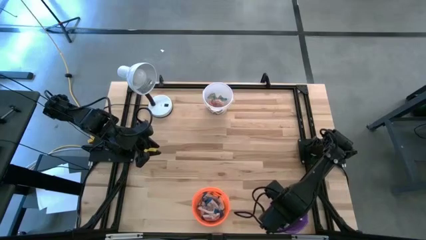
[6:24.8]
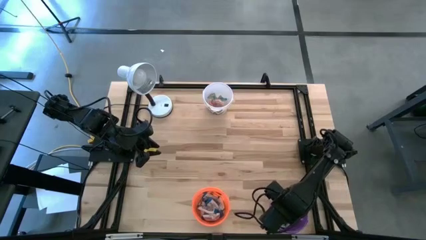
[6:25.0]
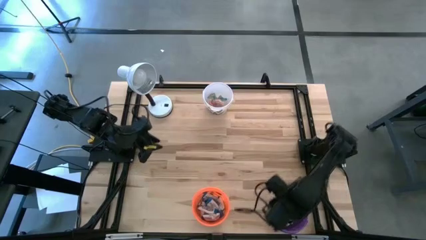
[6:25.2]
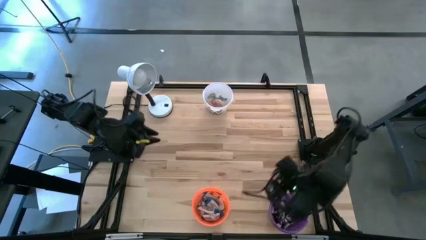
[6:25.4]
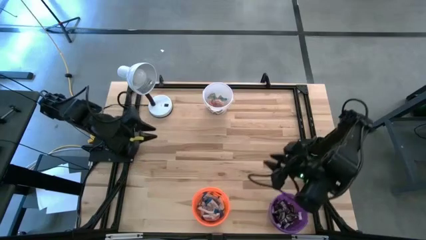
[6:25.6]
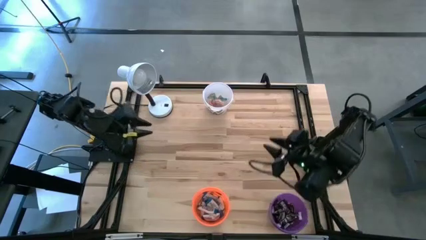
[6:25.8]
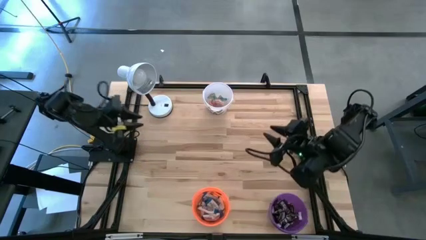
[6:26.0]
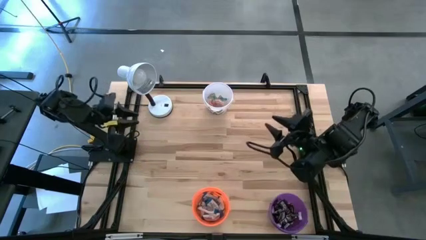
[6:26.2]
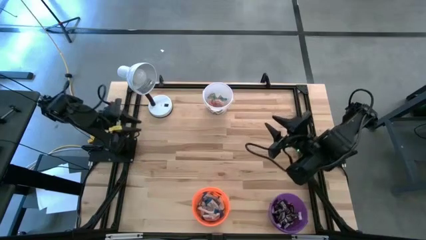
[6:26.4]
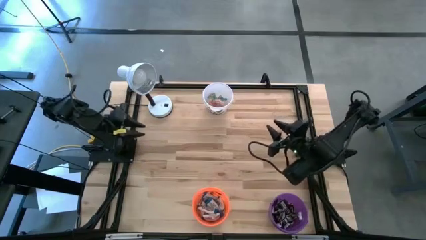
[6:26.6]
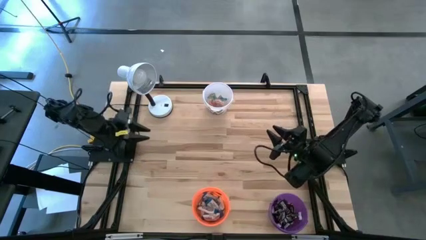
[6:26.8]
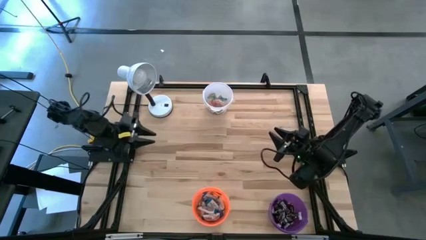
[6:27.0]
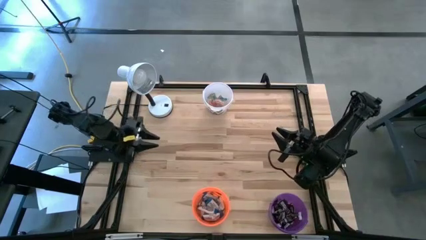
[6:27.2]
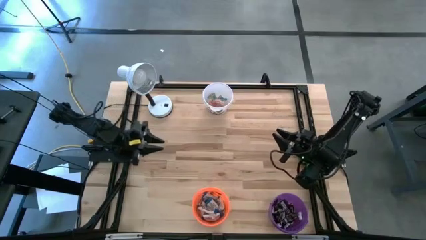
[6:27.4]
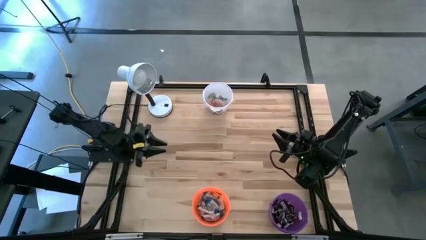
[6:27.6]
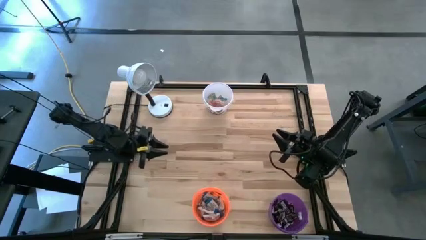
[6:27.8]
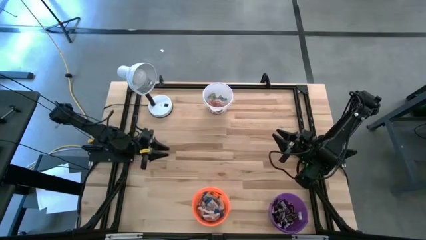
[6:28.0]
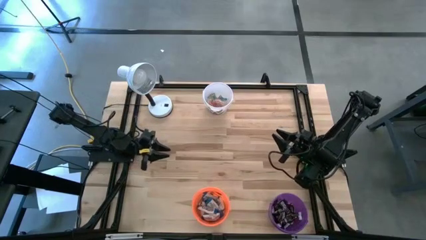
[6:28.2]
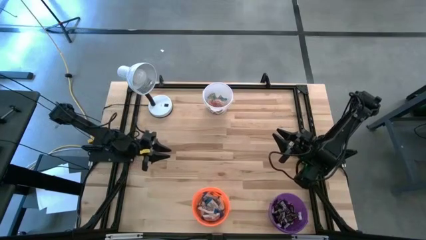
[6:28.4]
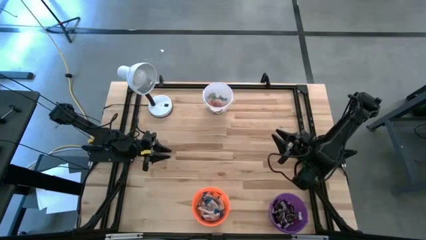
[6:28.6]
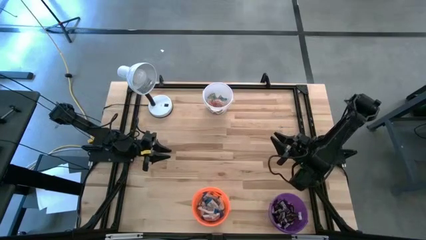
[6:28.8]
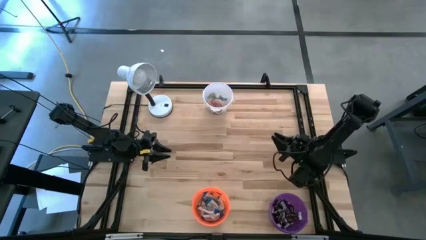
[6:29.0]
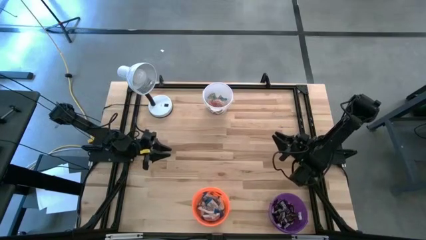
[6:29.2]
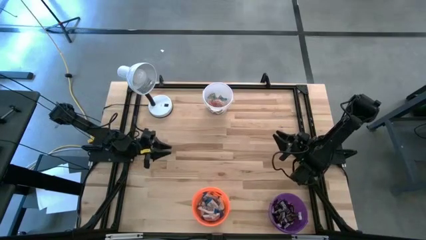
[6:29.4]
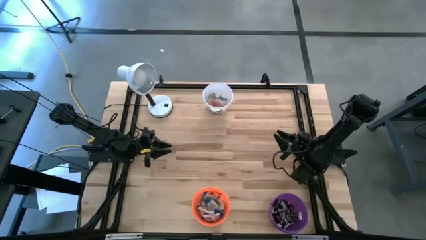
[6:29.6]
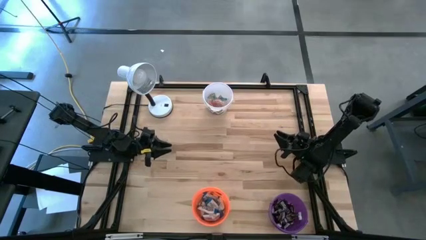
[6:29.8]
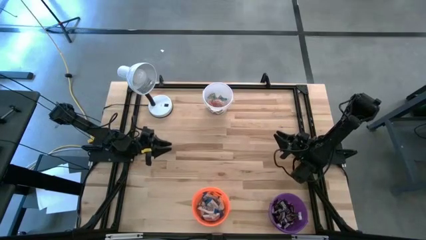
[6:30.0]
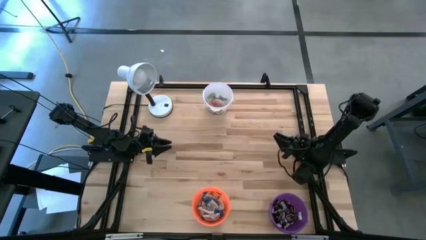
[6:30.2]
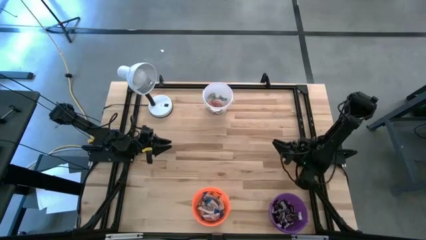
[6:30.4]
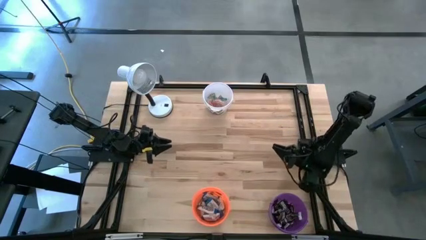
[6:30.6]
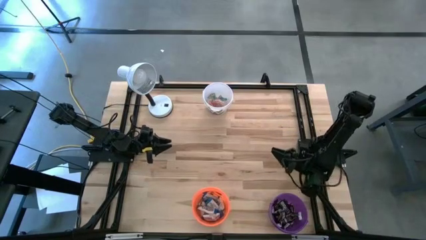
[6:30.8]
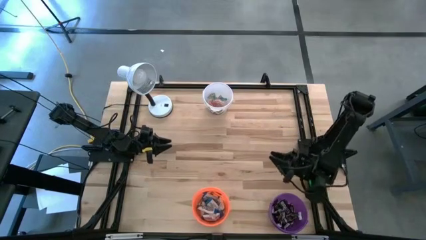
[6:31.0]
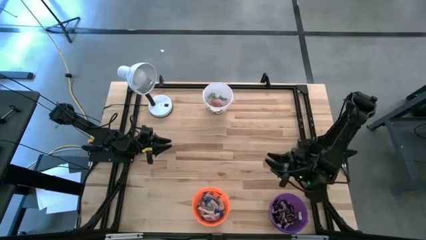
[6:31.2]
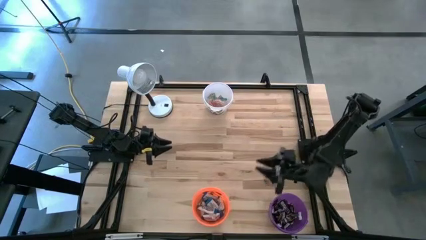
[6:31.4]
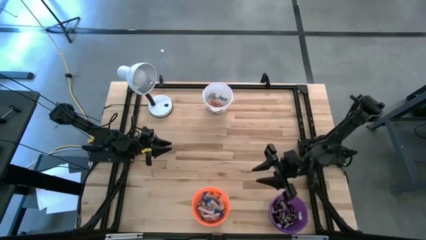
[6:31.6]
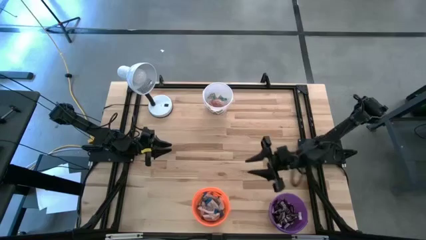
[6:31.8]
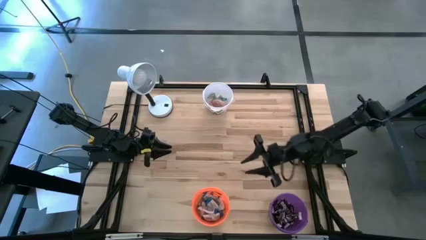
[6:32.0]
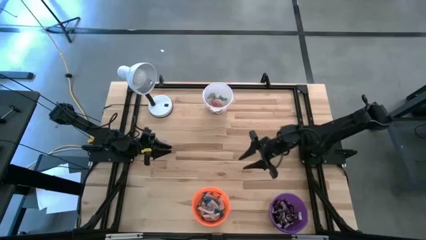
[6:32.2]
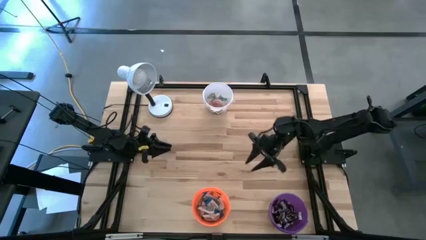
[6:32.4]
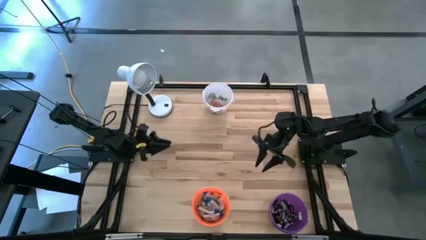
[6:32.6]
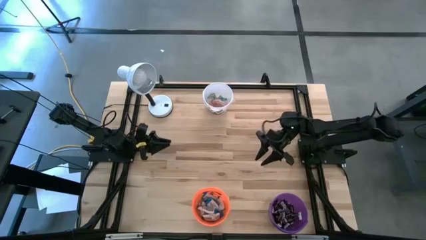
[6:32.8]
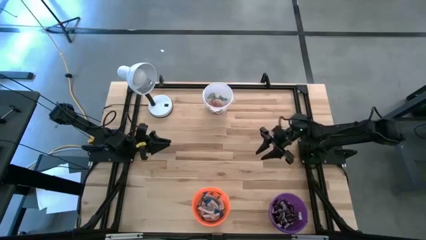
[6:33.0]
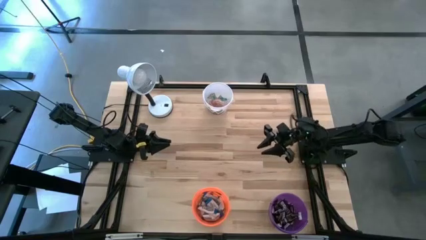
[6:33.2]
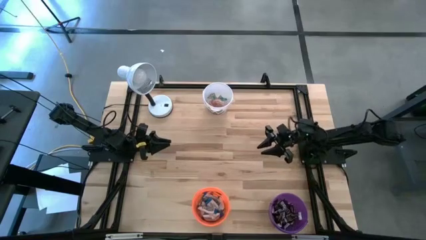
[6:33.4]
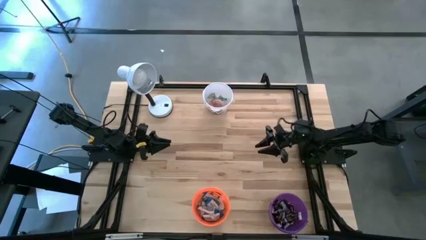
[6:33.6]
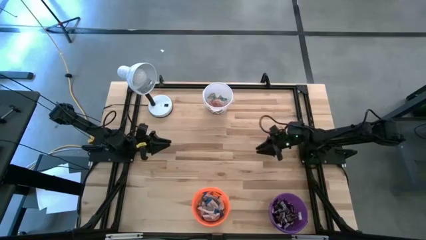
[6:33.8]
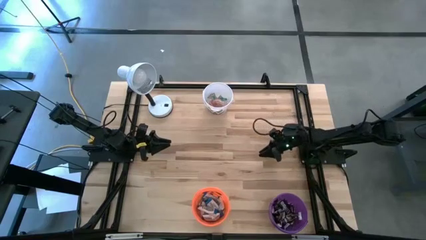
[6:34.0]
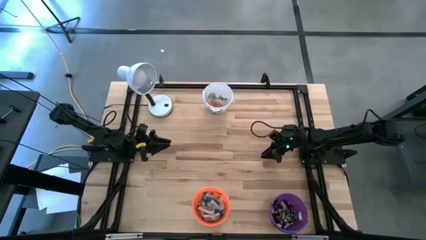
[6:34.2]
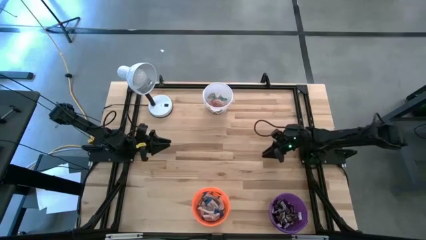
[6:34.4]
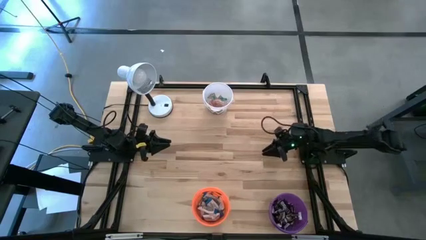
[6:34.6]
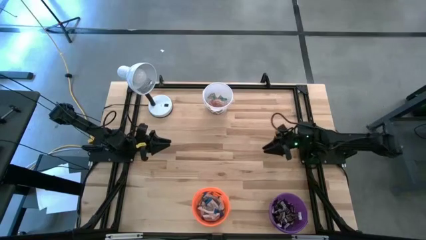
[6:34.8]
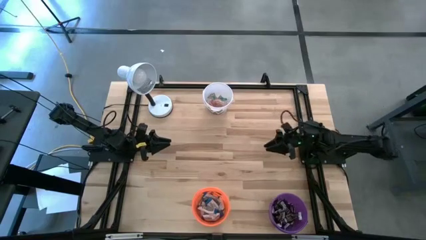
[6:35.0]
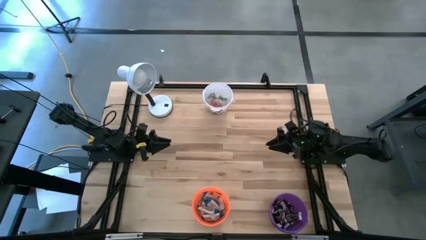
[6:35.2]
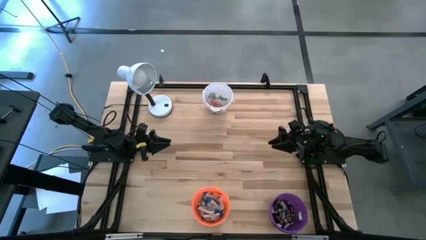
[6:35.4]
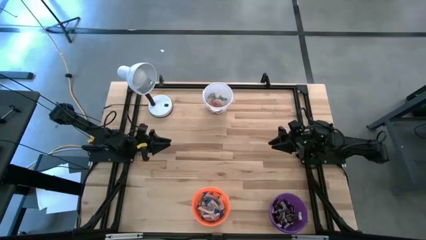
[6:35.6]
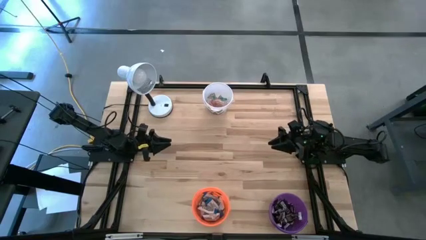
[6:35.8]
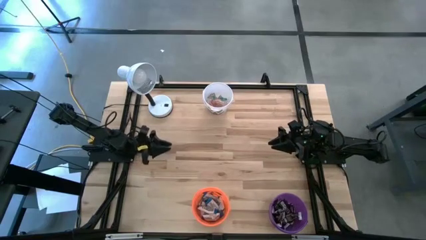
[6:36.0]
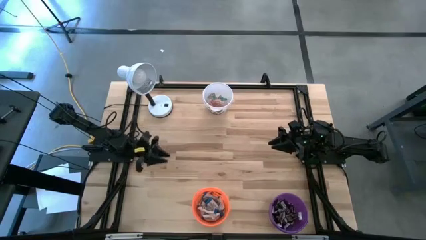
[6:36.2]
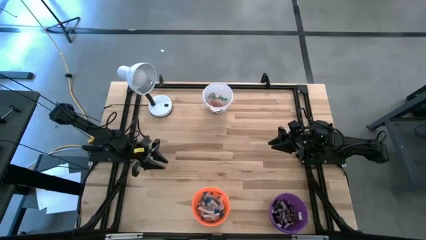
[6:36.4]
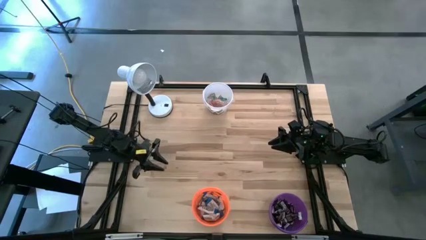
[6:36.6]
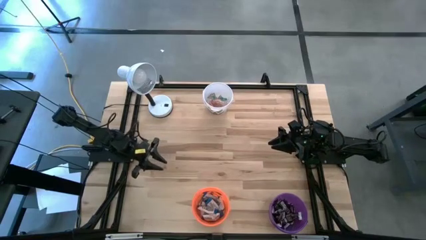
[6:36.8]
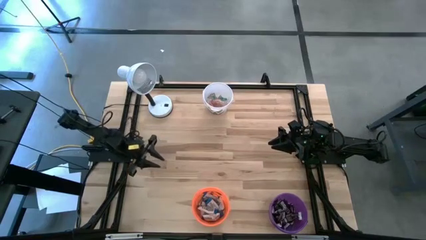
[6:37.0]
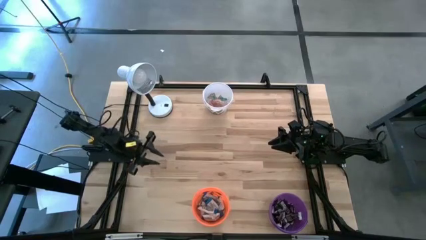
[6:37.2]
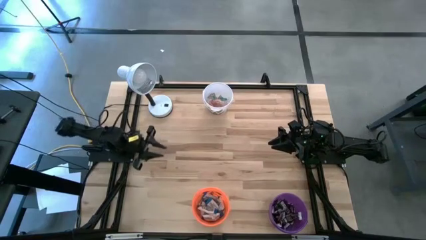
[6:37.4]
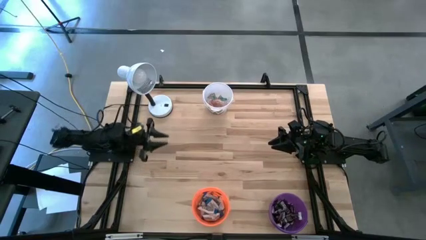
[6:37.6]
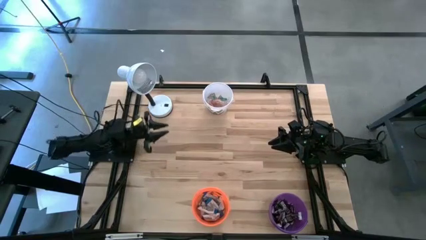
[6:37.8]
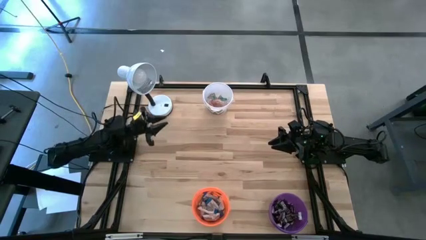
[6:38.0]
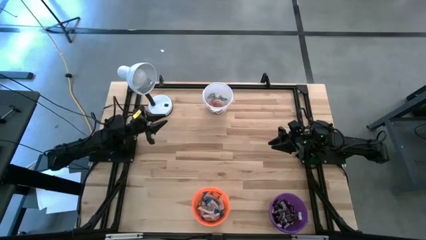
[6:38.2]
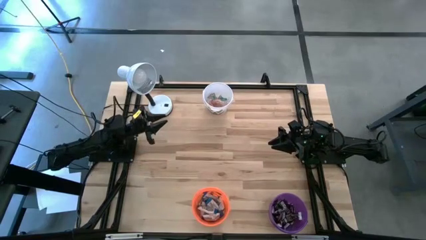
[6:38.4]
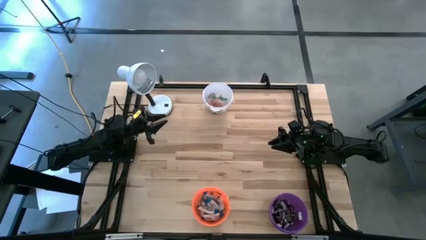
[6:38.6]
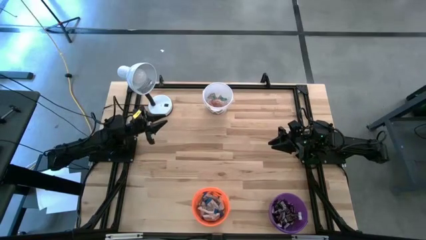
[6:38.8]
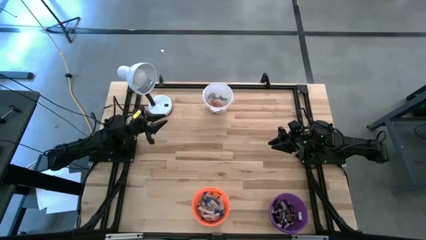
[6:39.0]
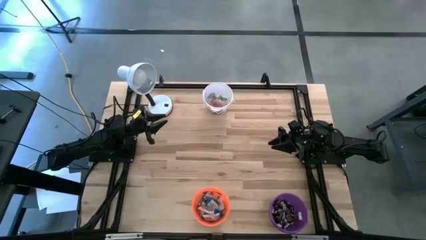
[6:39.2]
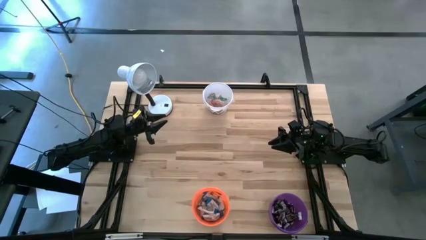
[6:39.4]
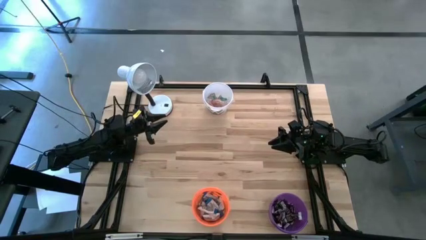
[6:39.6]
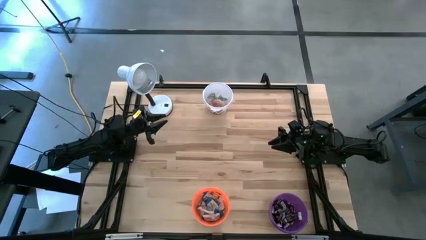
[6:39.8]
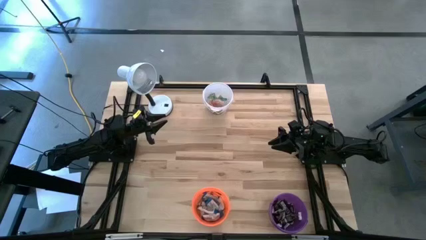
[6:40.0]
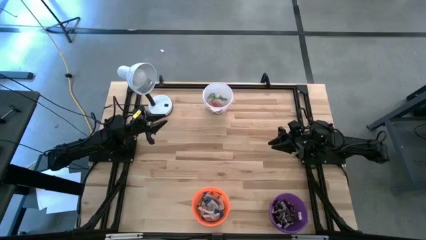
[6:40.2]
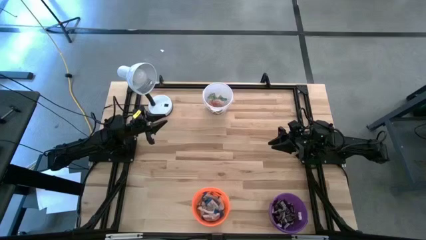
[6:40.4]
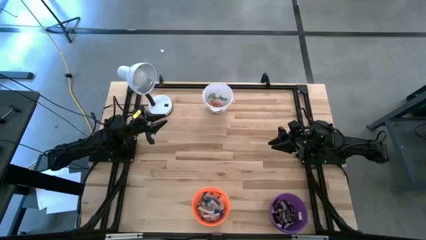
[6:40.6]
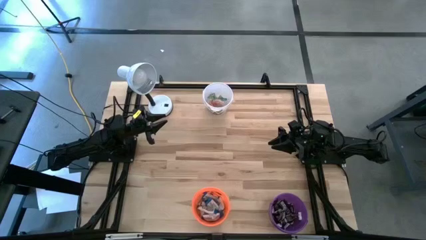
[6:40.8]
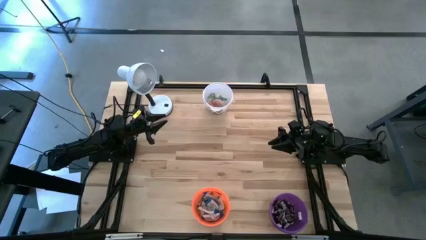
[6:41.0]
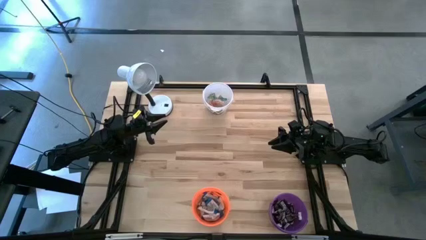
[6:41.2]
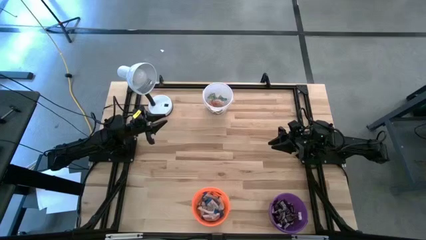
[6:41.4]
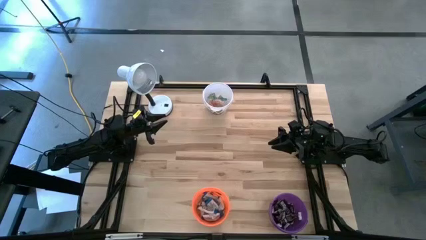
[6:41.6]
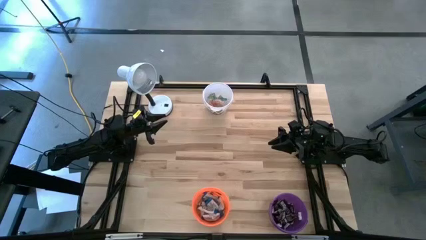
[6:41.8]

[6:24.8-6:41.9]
Task: Organize candy in baskets
Return to Home Position
